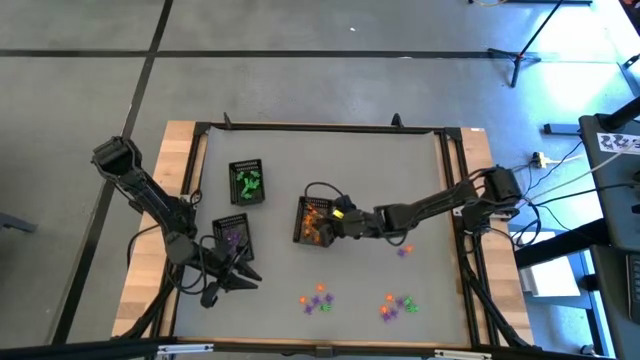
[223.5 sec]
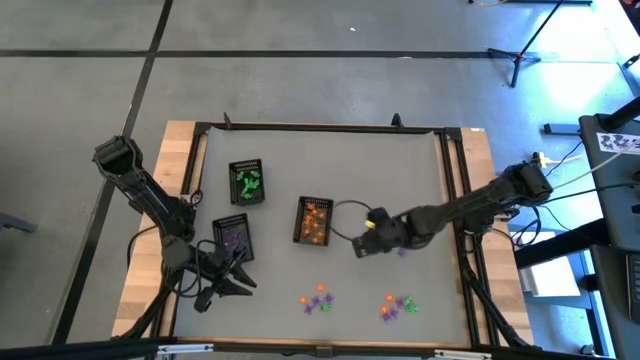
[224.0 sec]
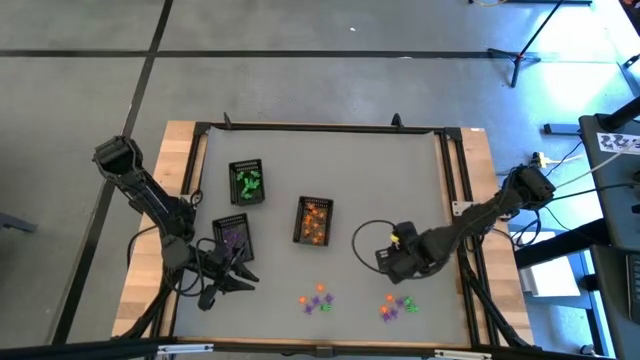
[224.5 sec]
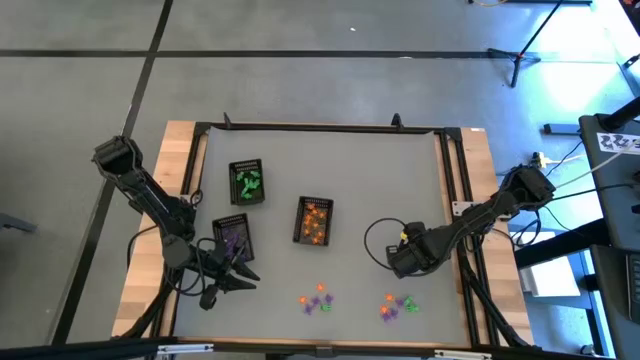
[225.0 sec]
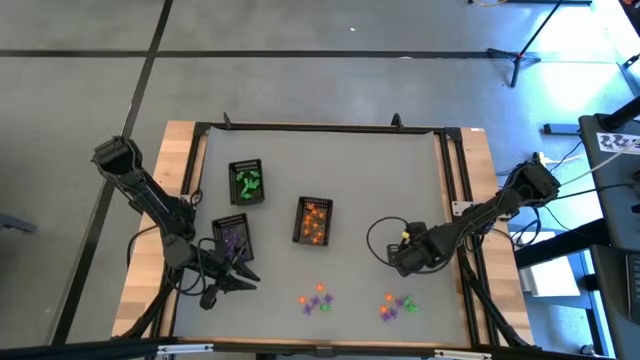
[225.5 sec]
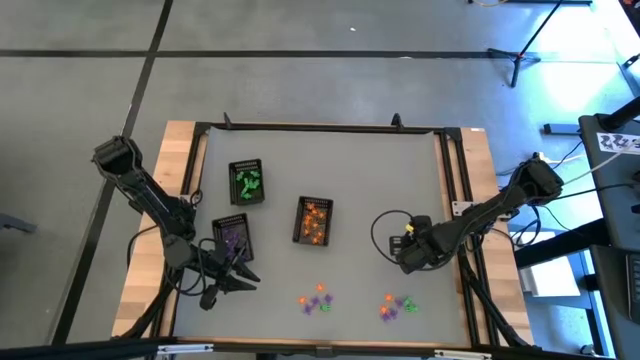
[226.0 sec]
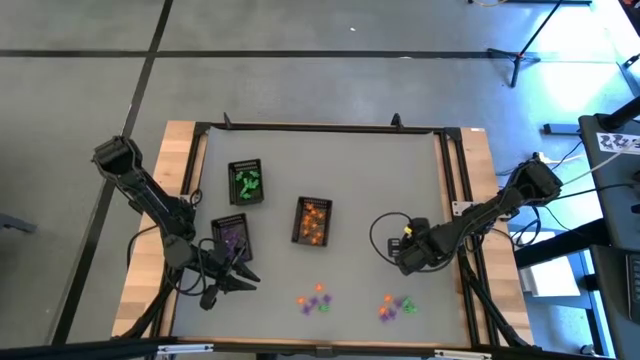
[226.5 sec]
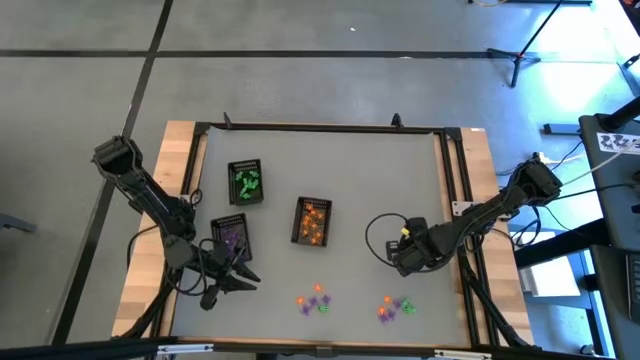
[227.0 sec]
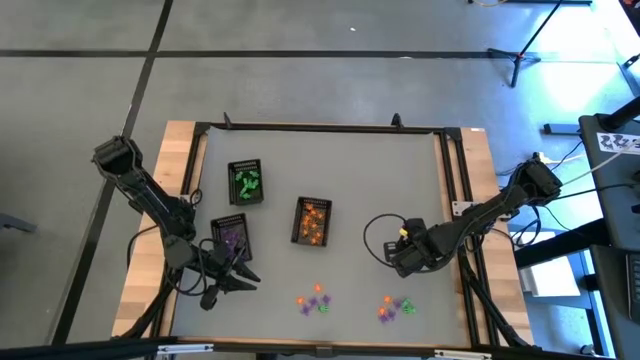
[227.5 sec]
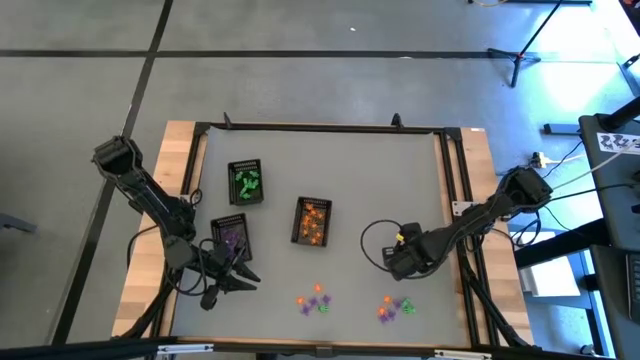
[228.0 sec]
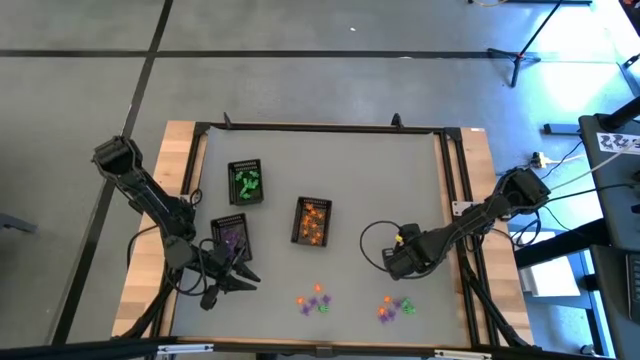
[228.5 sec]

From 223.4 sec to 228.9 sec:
Task: Sort Halloween decoration
Put the orange spider toy into the bottom right black basket

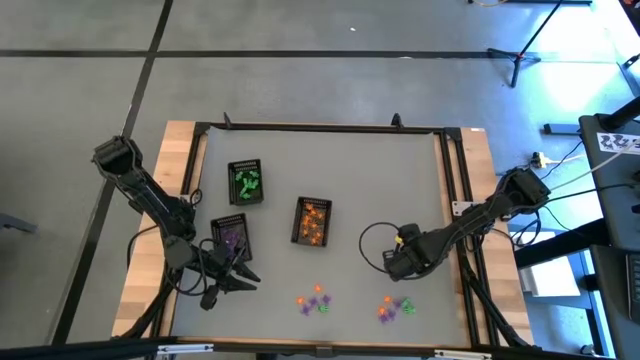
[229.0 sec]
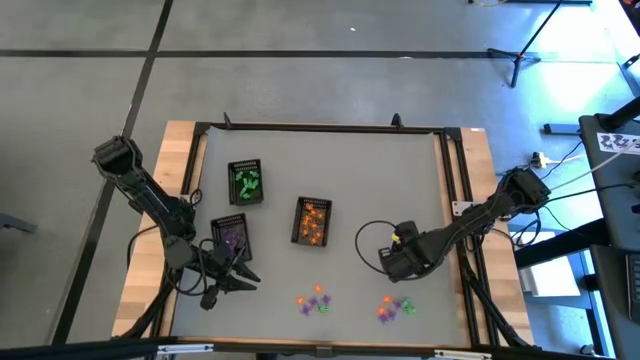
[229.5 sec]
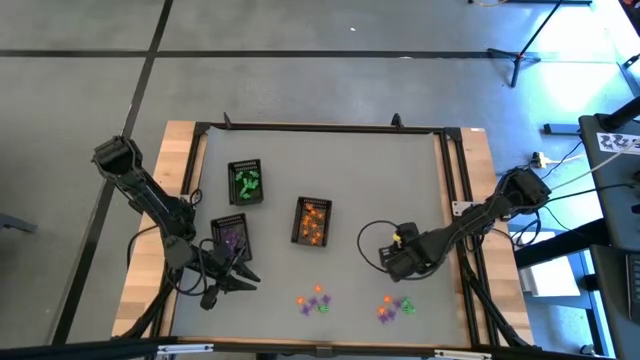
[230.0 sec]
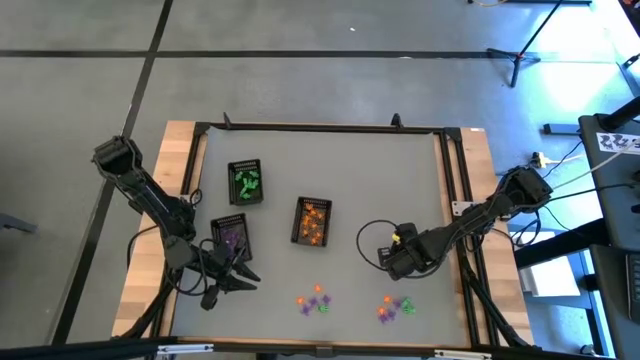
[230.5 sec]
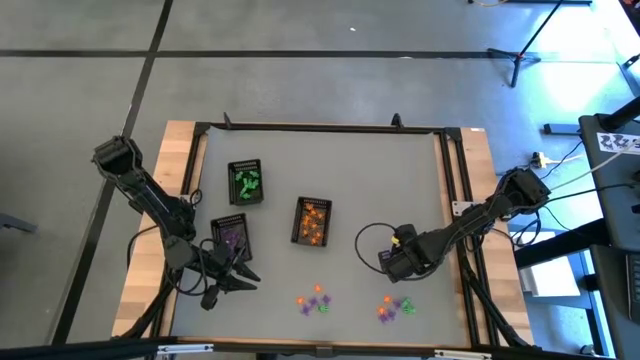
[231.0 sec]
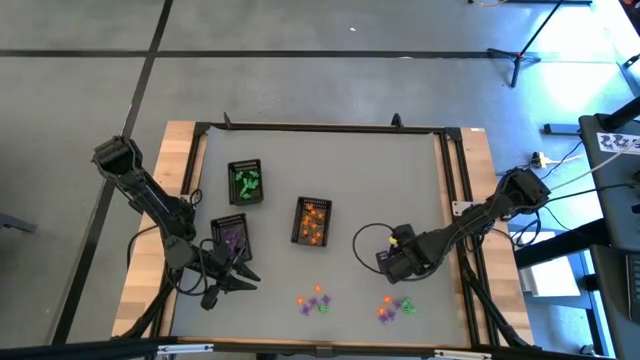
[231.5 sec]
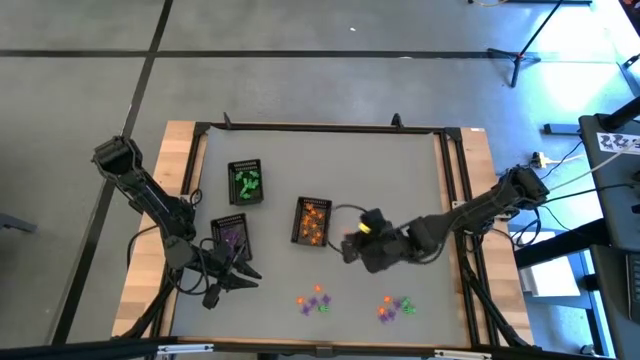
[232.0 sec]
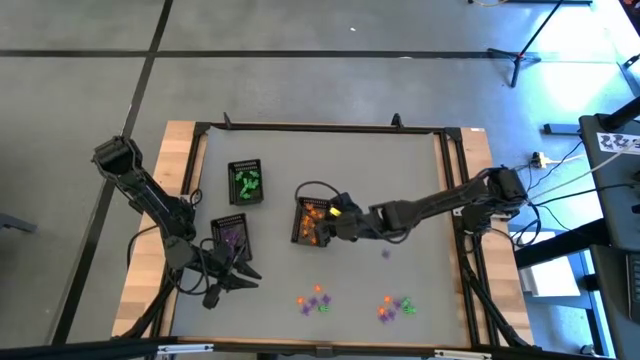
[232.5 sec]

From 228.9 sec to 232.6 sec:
Put the orange spider toy into the bottom right black basket

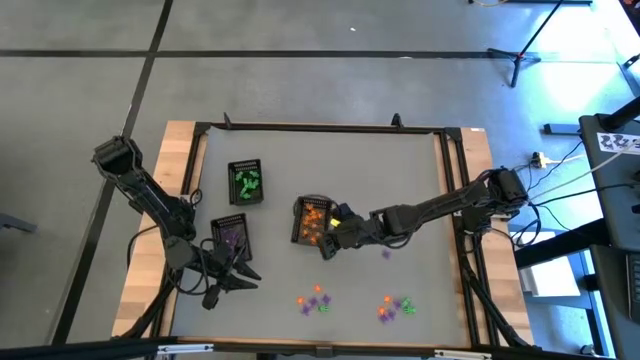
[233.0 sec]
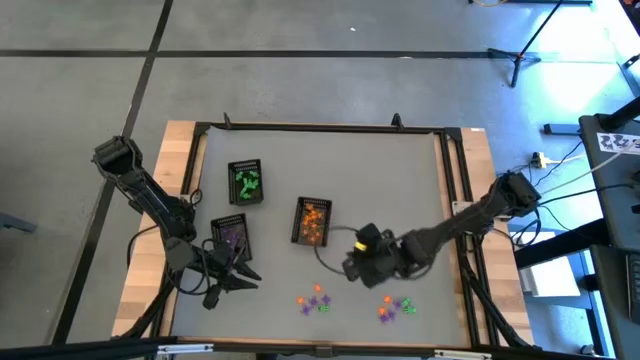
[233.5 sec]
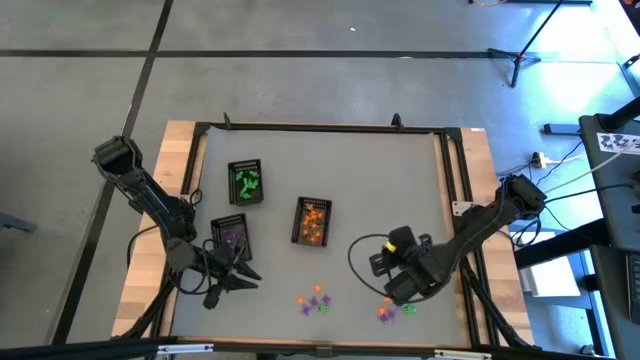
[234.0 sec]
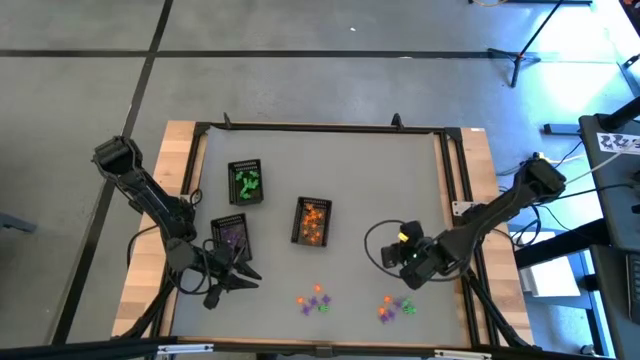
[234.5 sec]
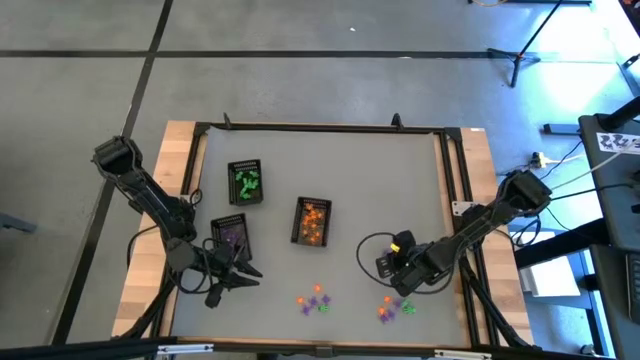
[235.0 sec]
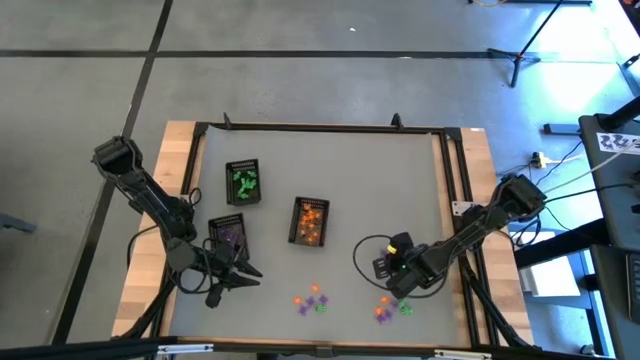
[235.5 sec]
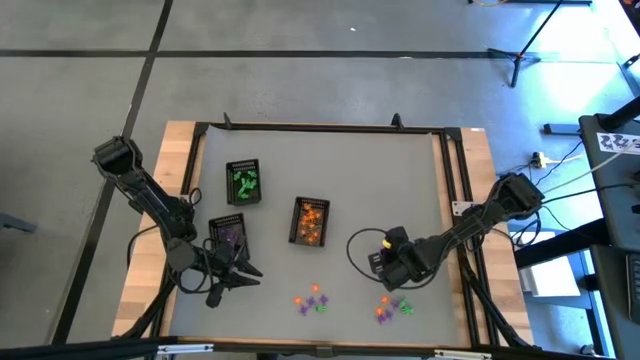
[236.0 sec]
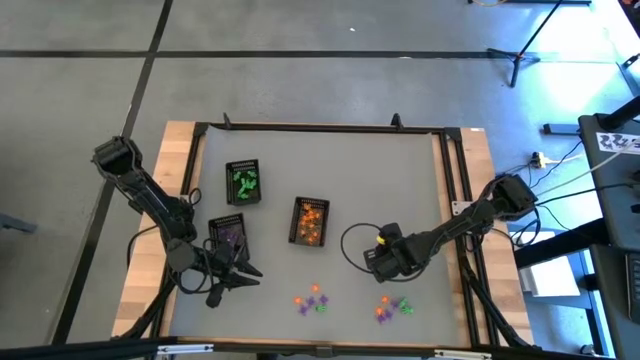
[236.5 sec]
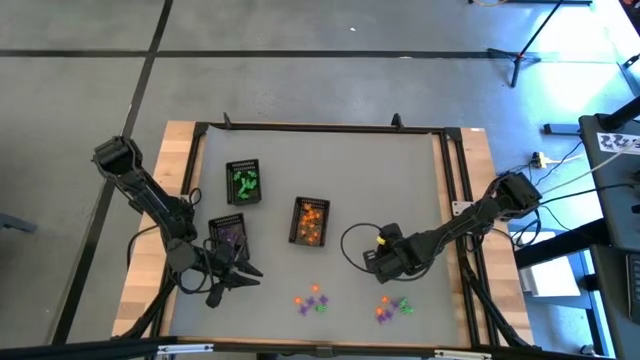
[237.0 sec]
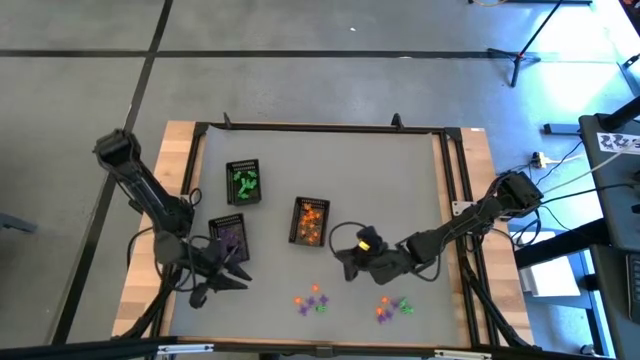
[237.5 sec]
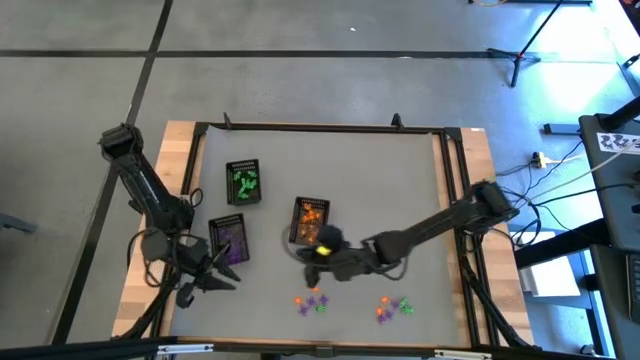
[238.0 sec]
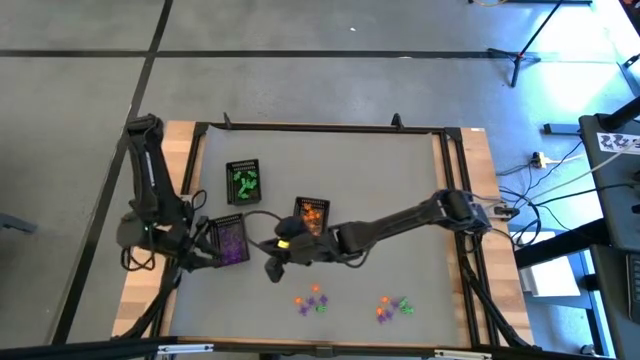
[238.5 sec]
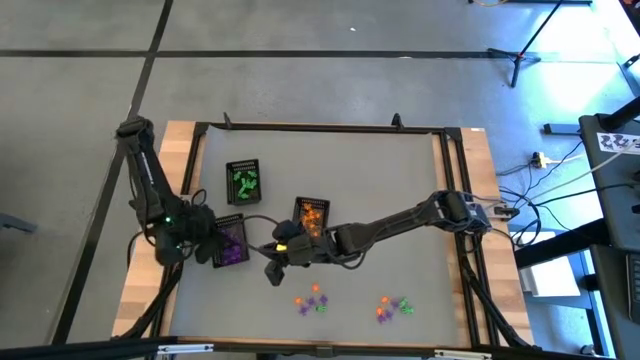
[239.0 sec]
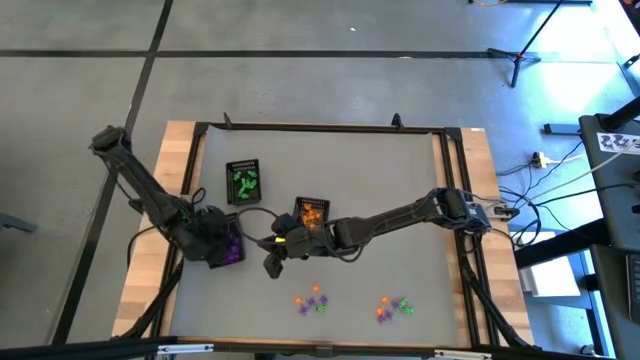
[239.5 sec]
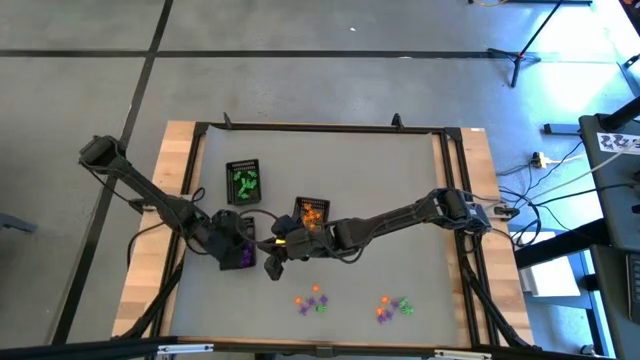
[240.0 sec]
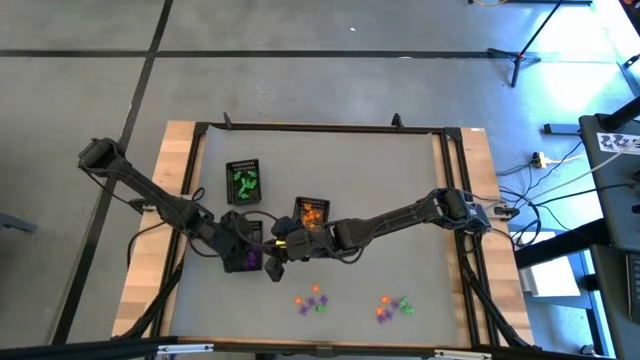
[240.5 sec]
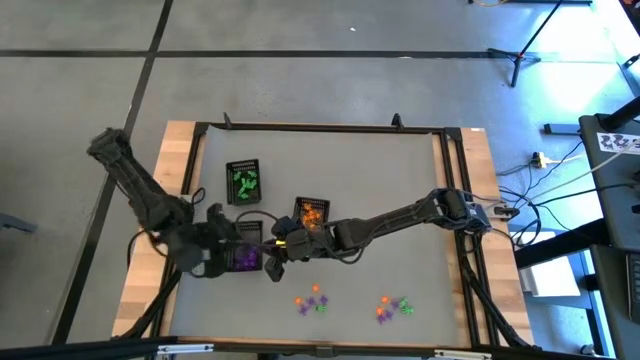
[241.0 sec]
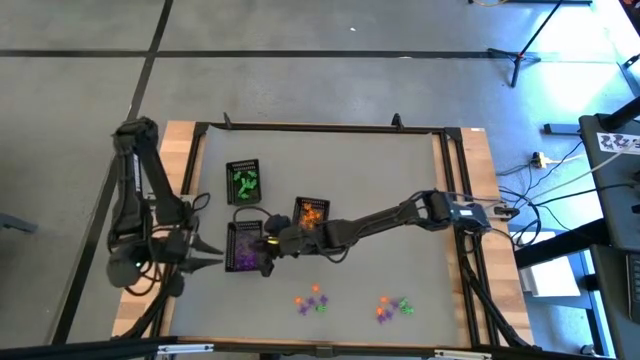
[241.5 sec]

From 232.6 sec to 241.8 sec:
Put the purple spider toy into the bottom left black basket

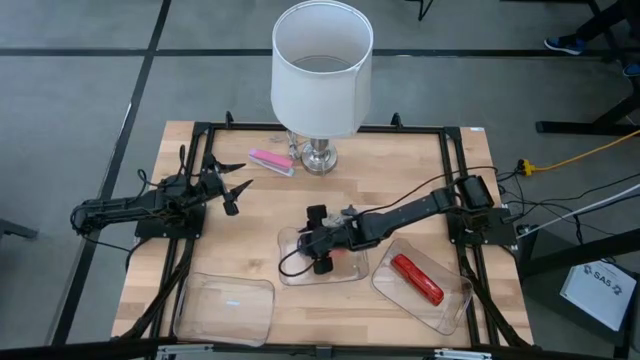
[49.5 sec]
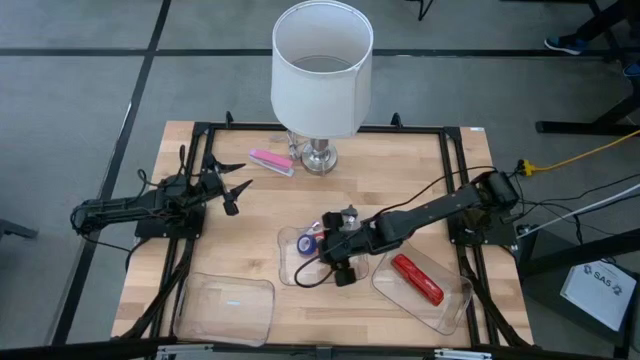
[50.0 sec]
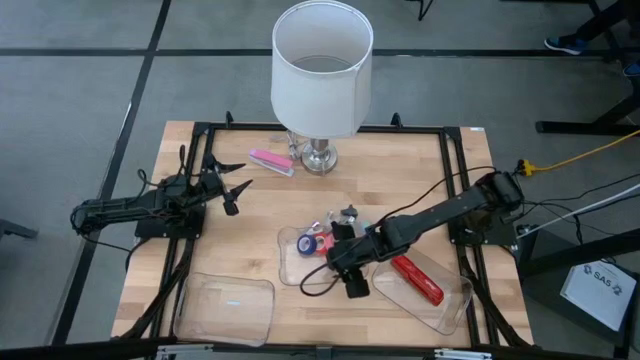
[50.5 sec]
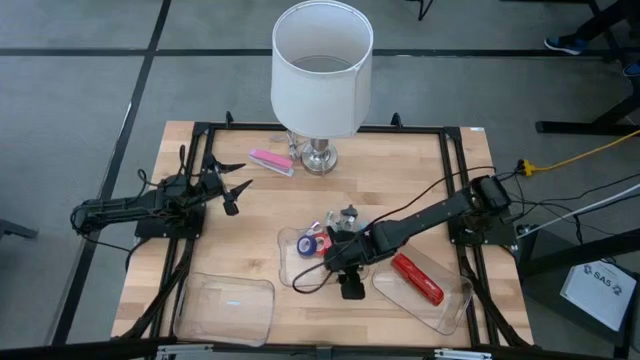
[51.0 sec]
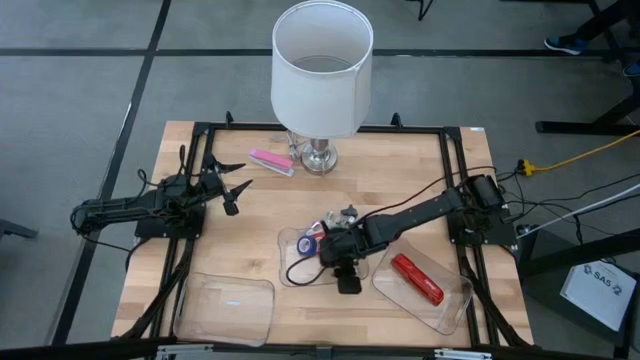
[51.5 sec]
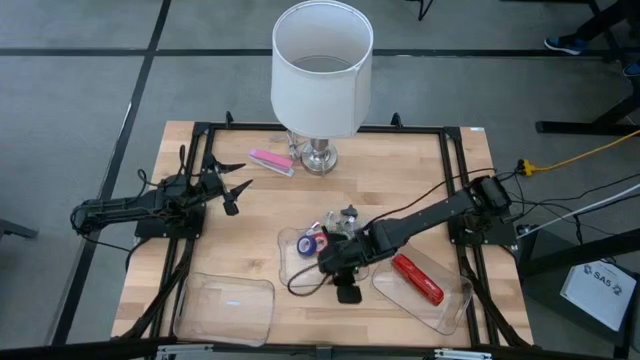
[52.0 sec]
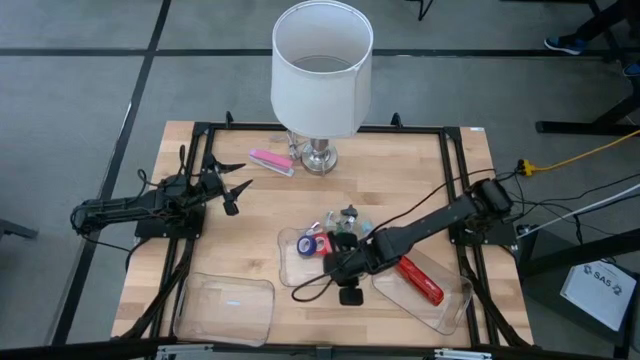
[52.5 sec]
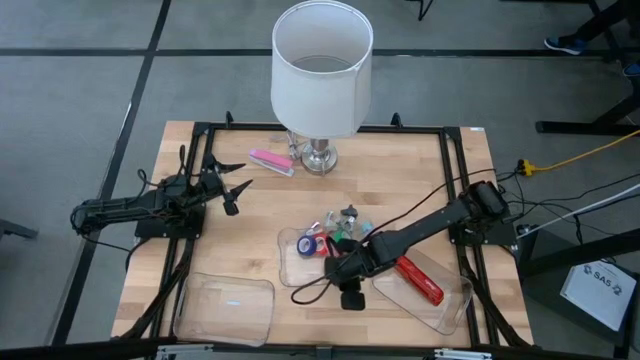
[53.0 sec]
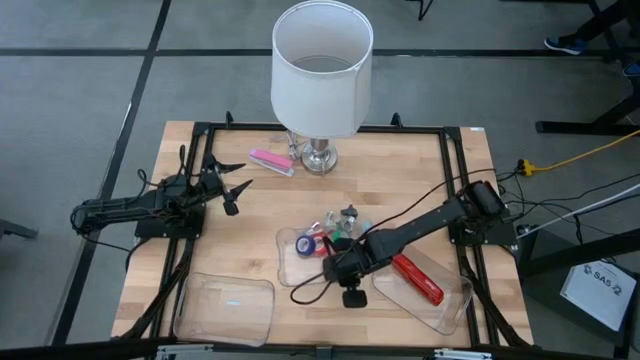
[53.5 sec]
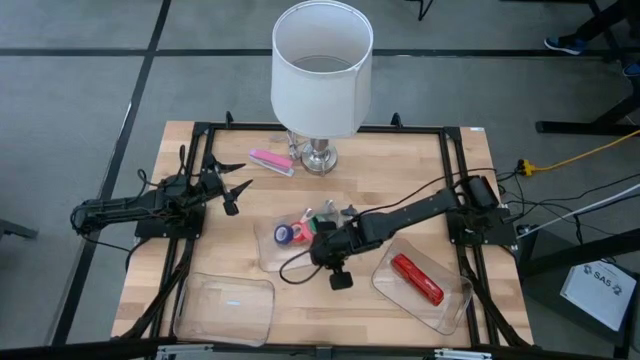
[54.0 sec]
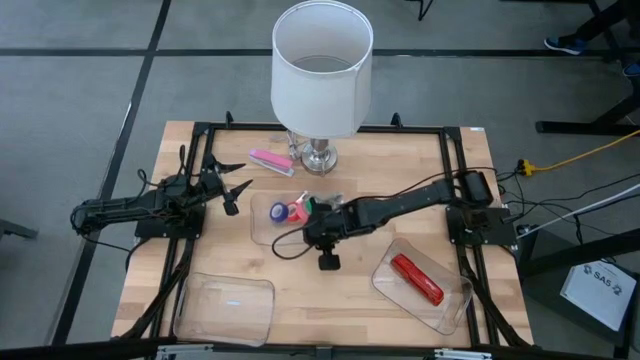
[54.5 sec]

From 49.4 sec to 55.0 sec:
Task: Pick and place Stapler, Stapler remover, tape
Move the top transparent bin to the center of the table
